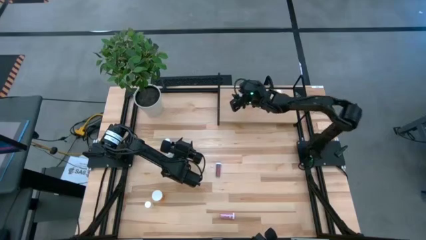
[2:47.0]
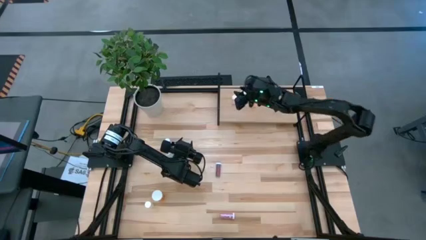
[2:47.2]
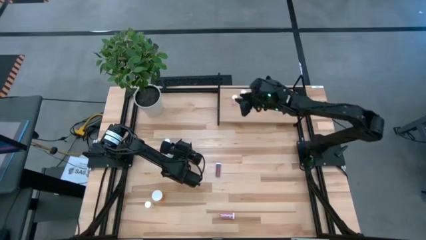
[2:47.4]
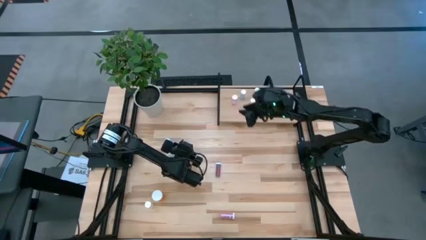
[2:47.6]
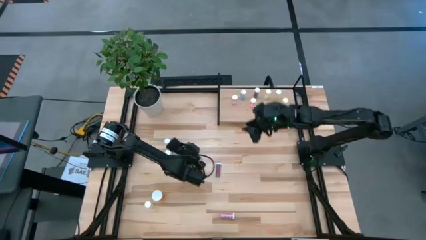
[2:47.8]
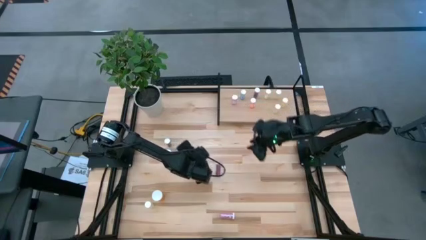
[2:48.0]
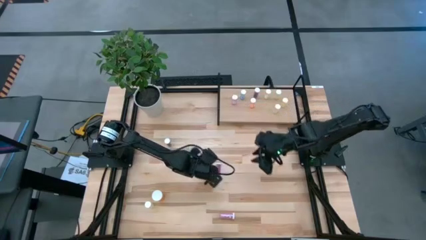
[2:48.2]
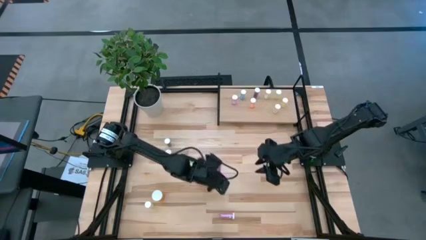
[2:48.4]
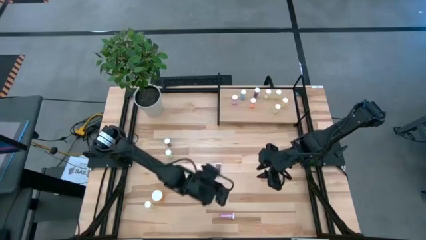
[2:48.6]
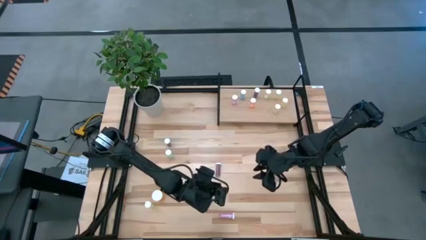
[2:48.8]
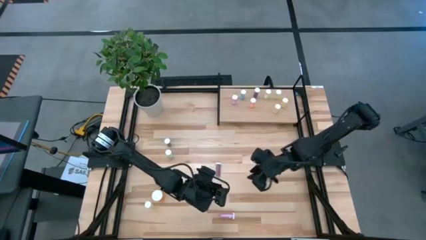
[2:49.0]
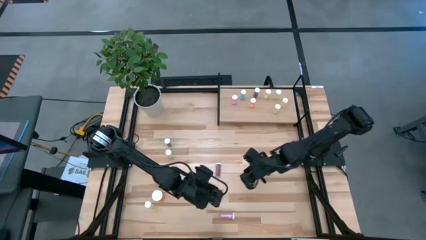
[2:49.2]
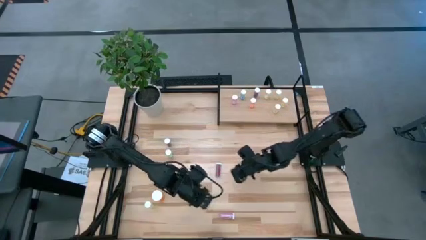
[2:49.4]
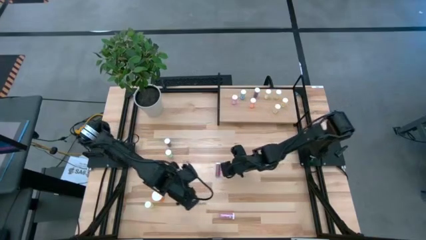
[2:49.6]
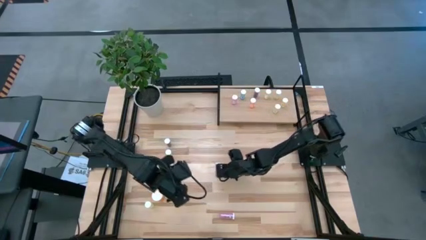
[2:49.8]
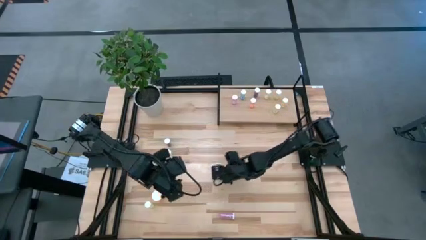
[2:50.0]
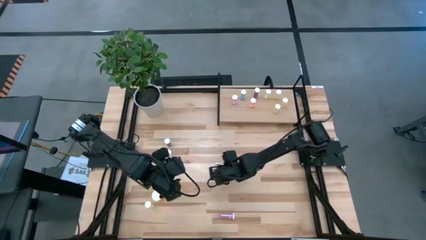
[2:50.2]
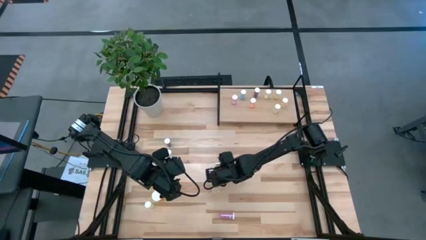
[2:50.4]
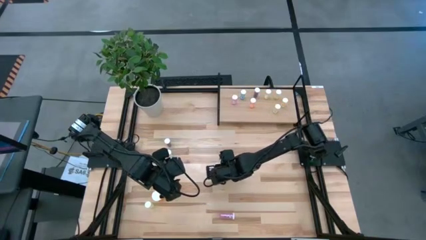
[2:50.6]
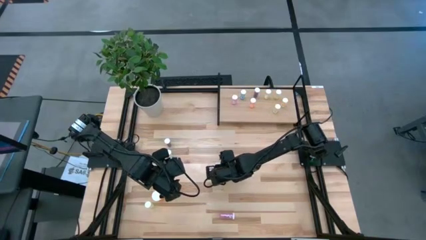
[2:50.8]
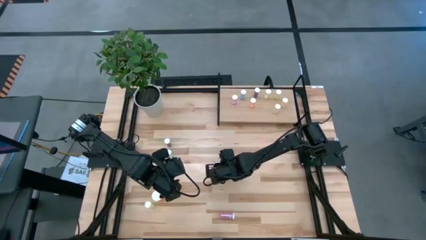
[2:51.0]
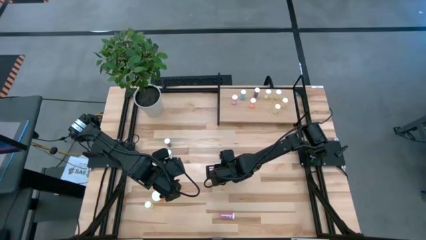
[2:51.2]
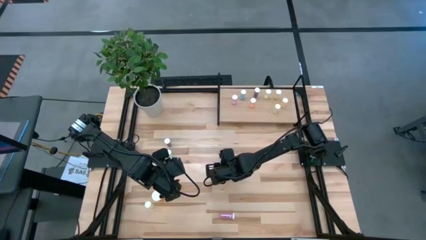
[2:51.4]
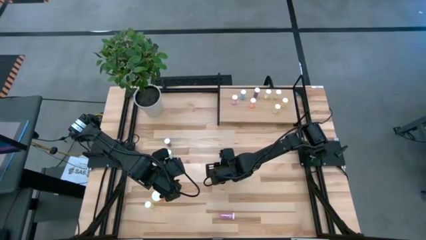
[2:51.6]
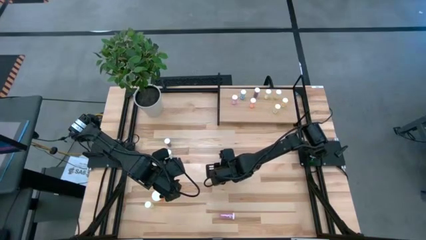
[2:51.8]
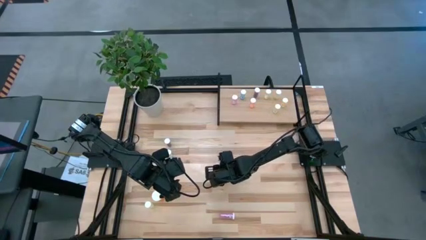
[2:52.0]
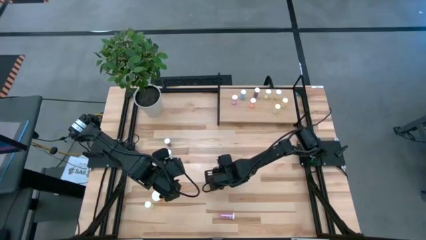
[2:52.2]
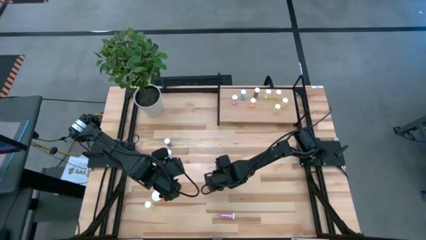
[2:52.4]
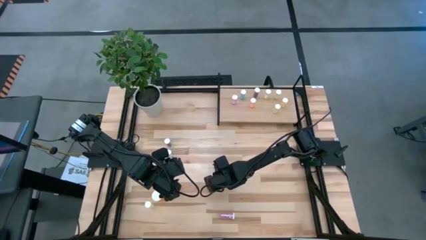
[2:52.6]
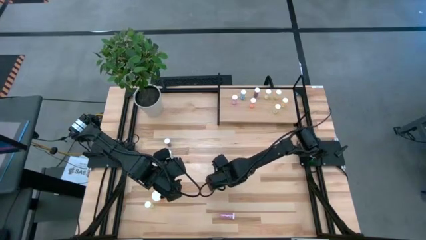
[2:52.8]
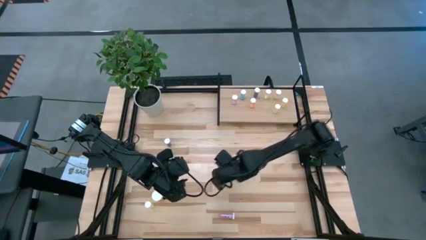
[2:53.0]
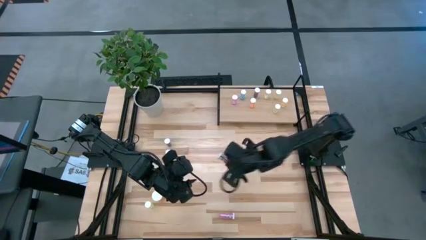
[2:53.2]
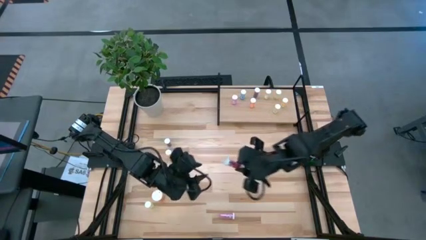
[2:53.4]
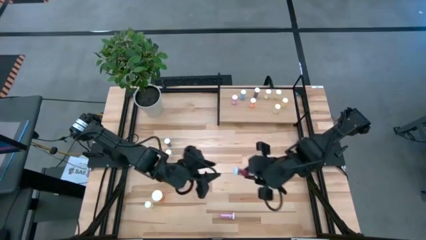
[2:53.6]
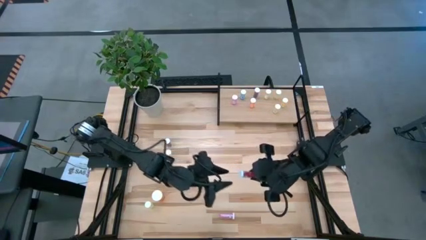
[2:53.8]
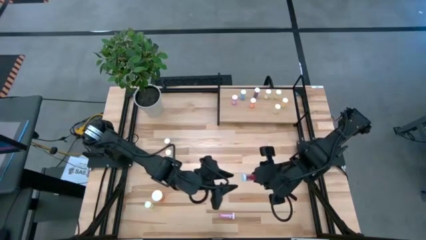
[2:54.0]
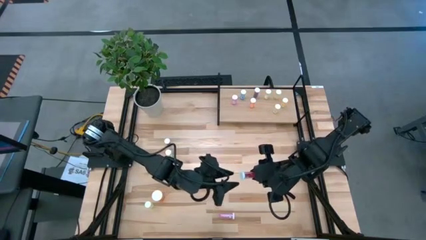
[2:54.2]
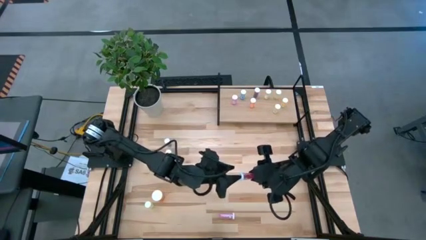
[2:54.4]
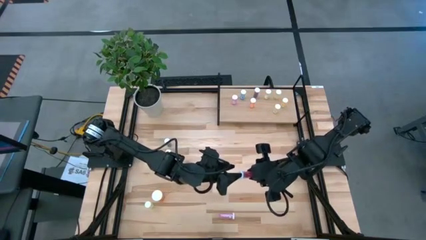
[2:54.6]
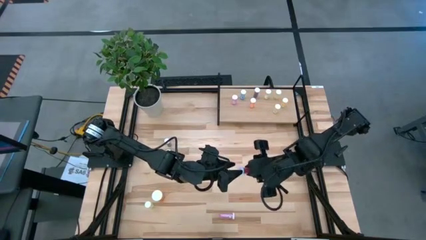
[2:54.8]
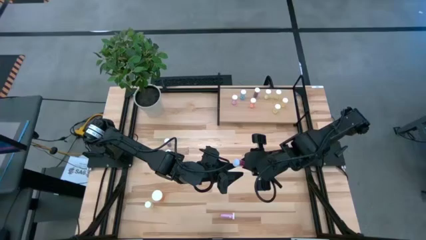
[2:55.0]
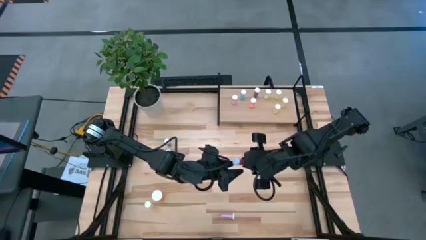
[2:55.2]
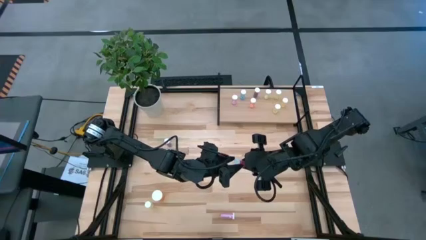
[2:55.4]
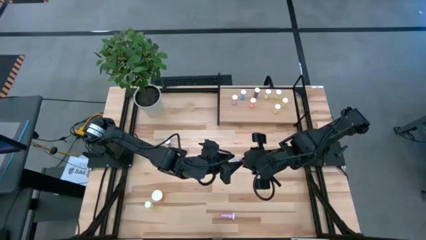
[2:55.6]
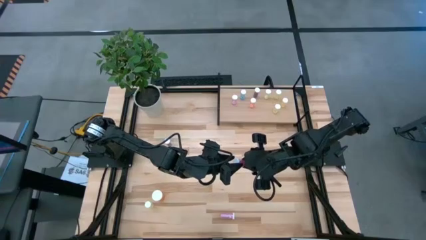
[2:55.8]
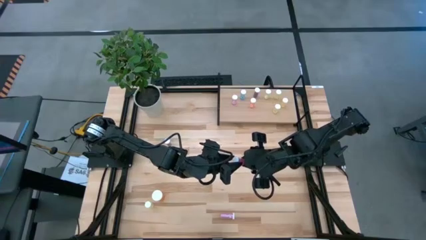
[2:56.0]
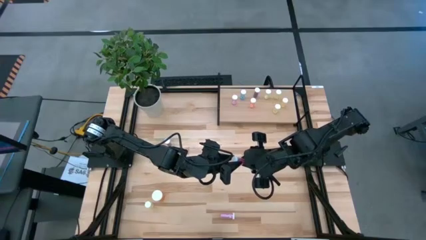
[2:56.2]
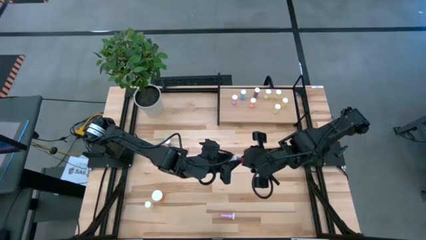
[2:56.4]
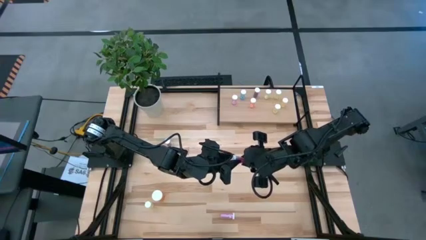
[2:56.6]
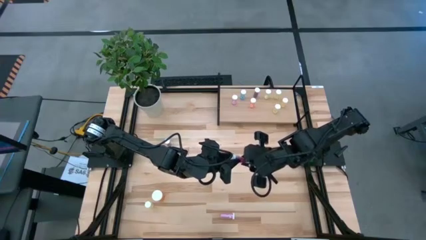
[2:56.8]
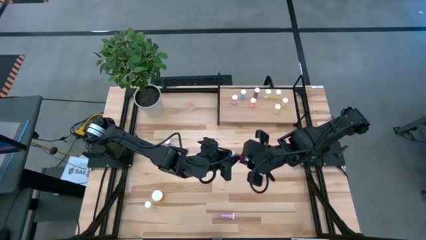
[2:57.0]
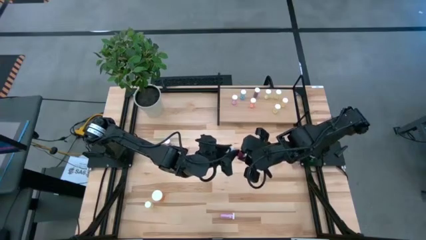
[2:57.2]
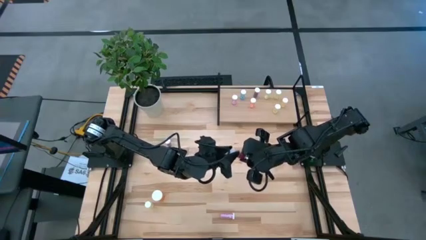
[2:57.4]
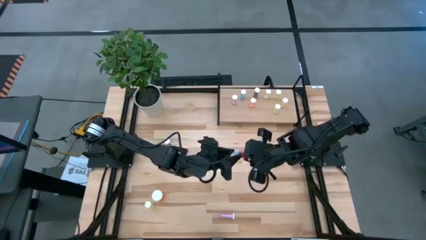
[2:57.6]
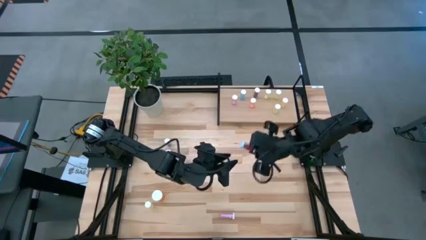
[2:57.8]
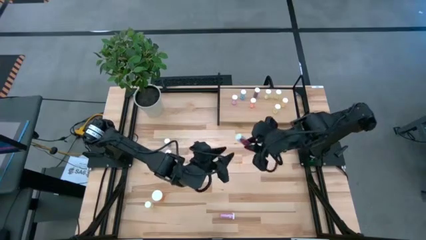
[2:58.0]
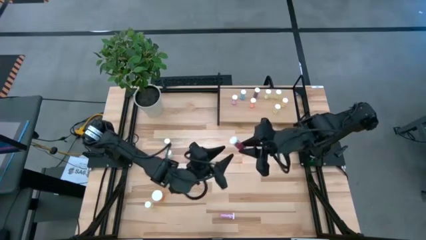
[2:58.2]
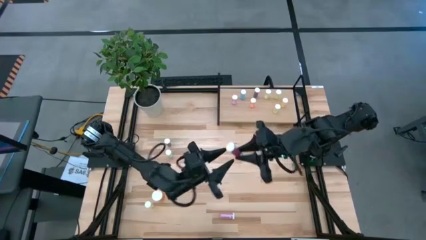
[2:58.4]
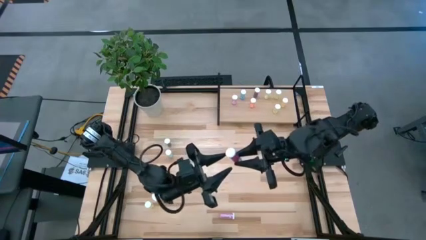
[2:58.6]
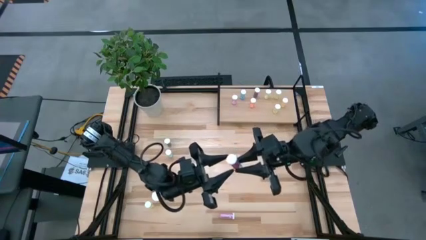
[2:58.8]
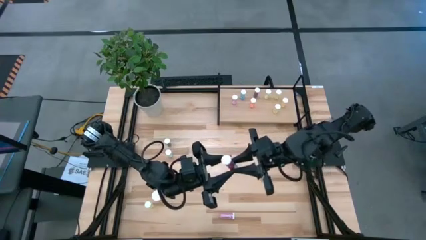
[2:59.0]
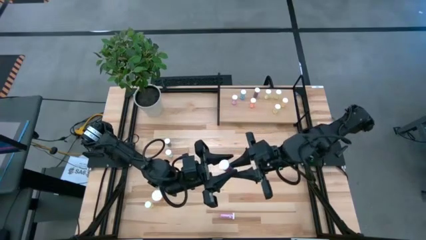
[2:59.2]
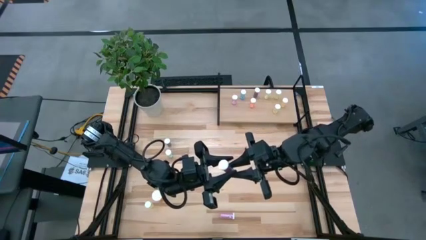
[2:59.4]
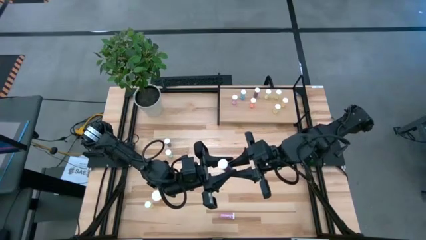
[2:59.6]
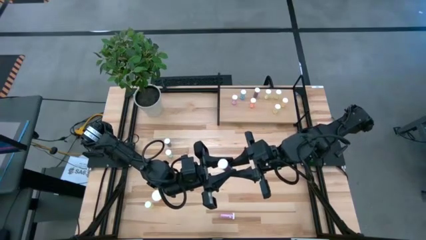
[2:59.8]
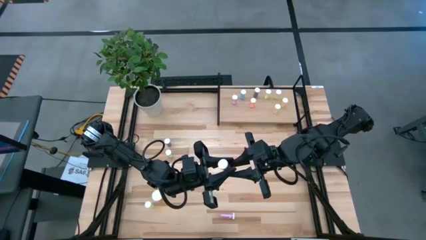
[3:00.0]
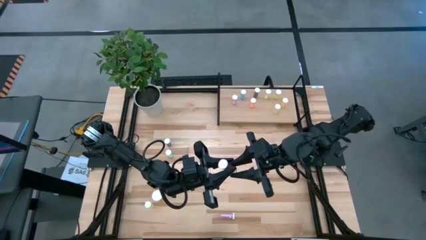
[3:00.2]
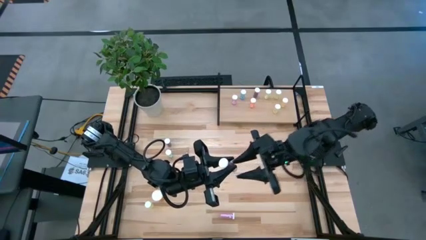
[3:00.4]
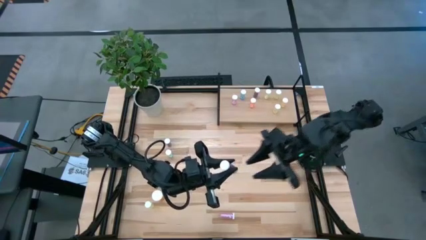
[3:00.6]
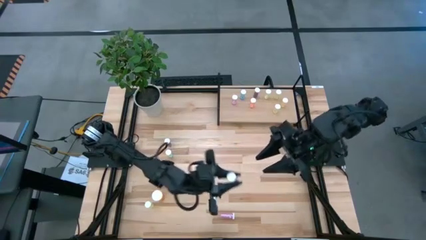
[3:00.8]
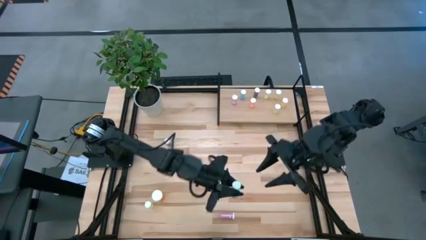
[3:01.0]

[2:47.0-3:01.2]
Task: Pick and place medicine bottles onto shelf by color
Put the blue pill bottle on the shelf
